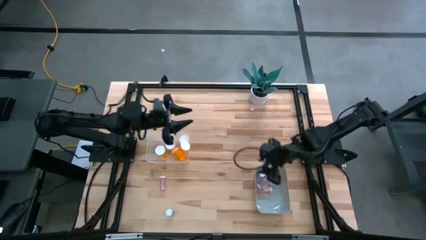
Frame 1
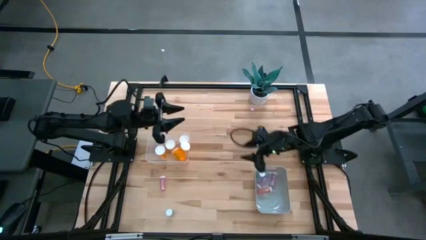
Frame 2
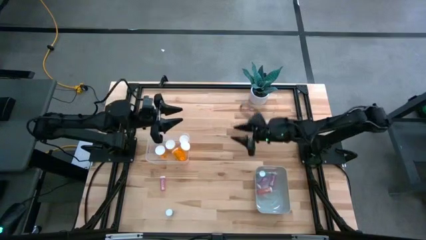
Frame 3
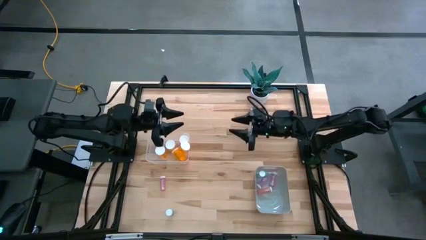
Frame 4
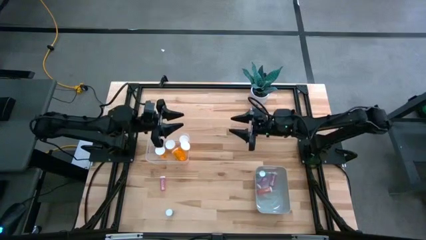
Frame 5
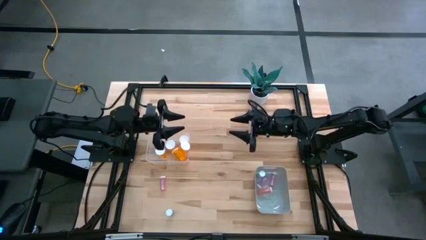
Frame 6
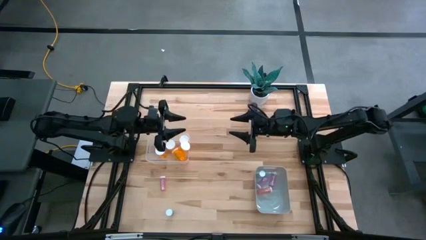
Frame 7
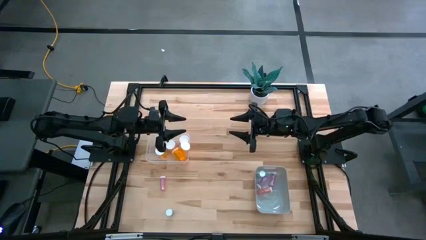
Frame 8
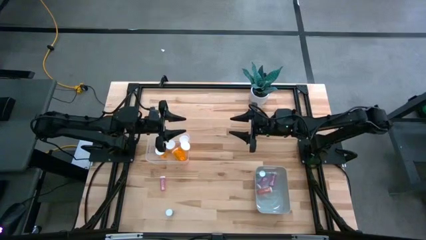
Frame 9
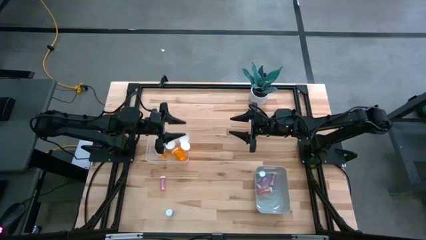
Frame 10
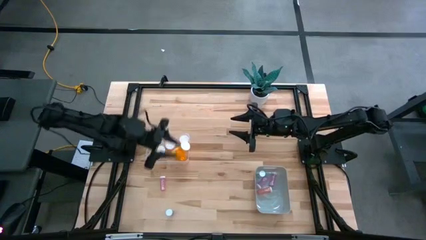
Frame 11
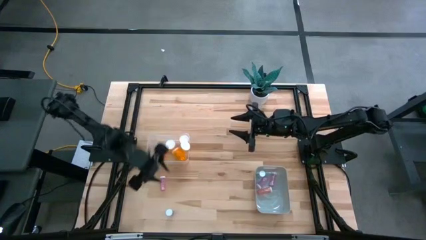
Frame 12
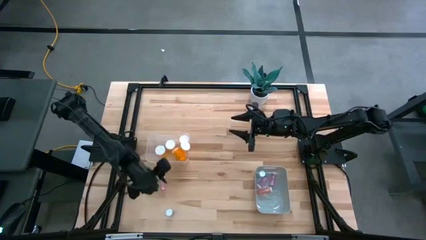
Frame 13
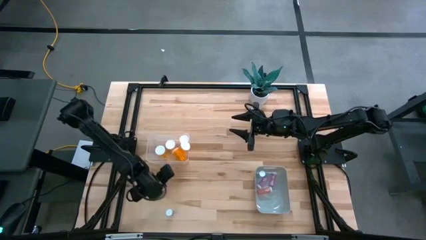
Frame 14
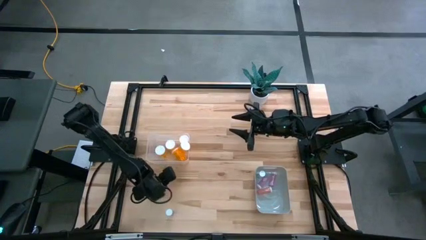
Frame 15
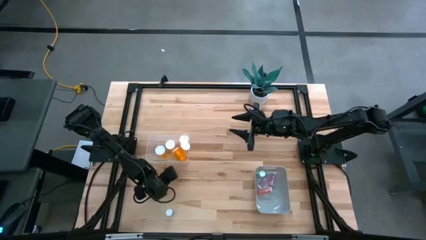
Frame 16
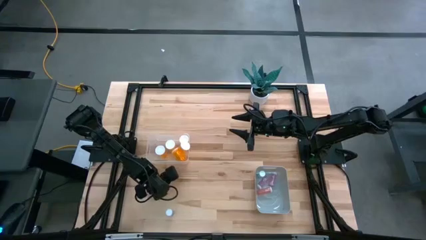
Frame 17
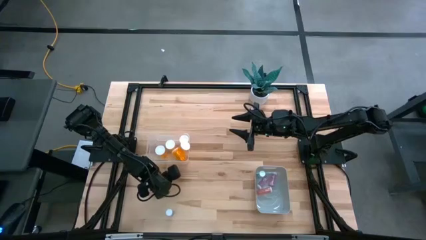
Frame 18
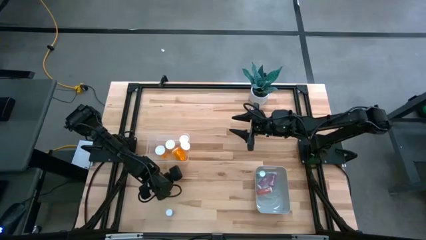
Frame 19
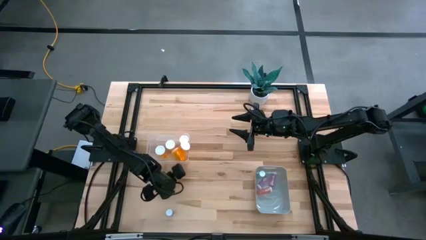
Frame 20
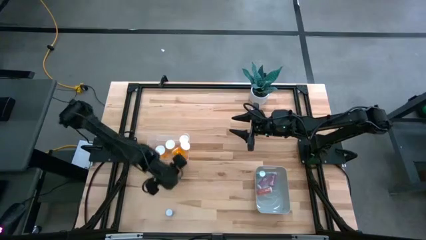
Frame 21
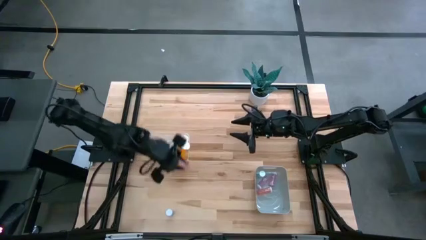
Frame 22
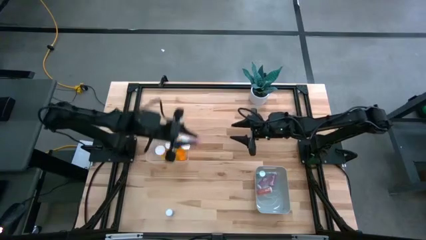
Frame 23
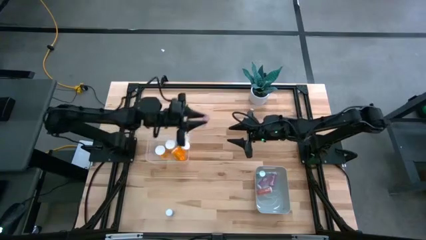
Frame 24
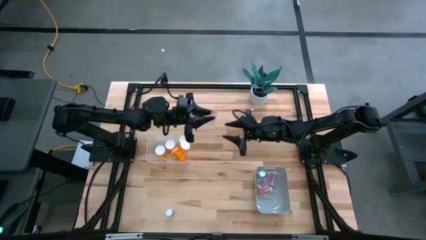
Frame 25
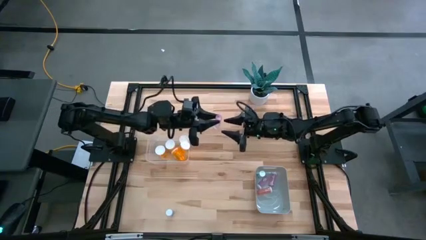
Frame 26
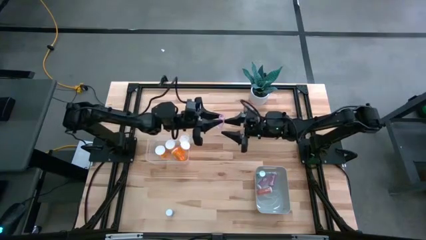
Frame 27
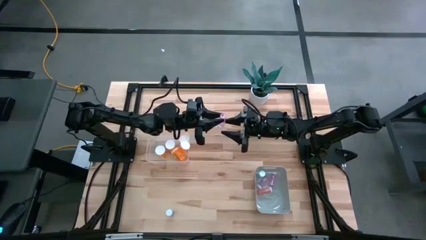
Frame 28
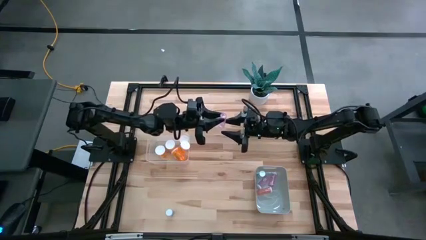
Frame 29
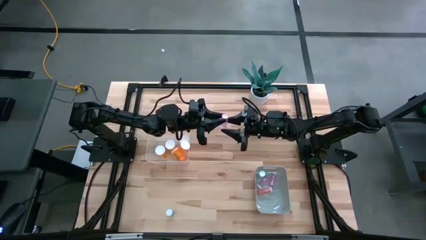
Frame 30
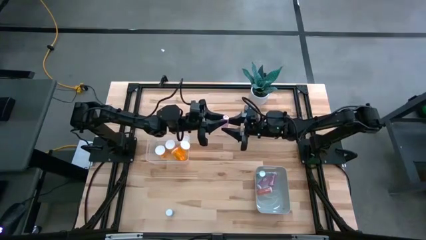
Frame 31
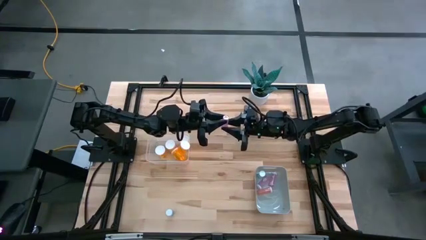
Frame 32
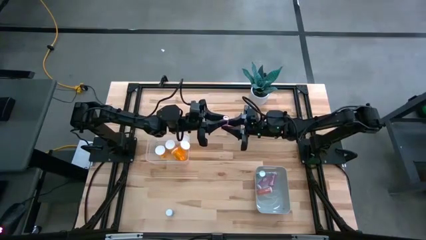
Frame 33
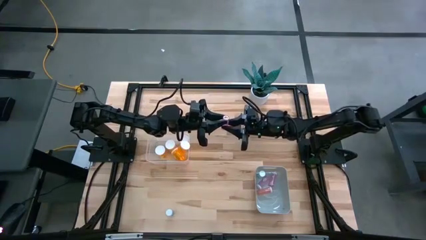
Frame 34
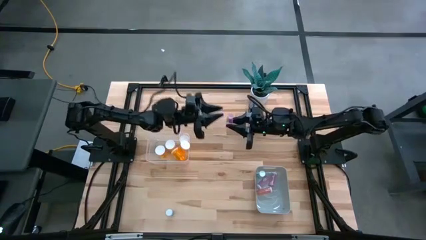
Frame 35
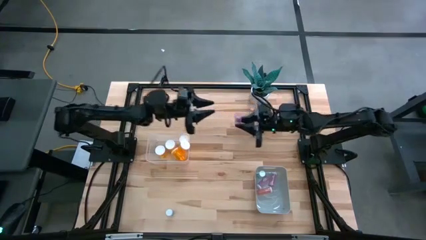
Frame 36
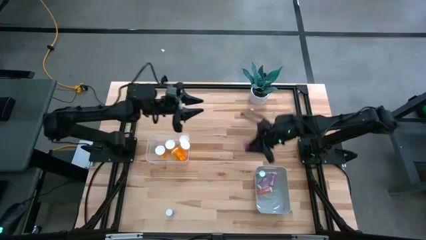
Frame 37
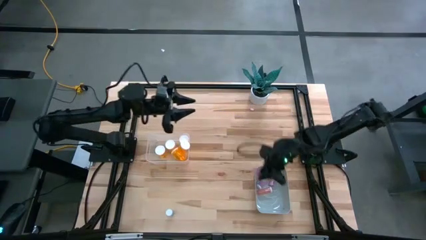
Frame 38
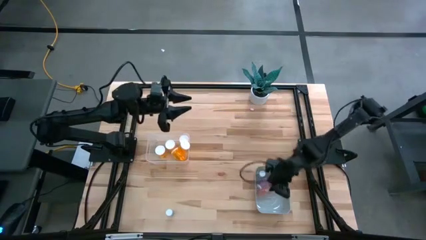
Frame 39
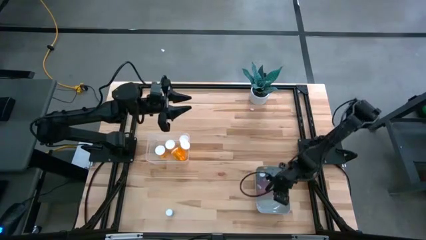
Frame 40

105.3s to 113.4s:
Task: Pick and place medicine bottles into bin by pill shape (circle, oval)
Put the small pink pill bottle into the gray bin

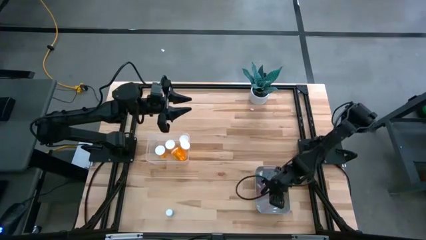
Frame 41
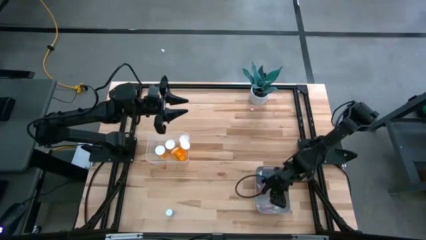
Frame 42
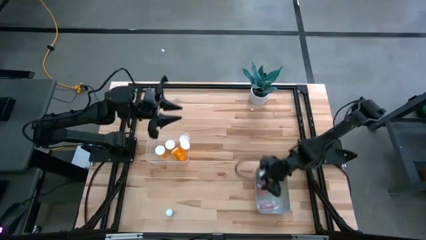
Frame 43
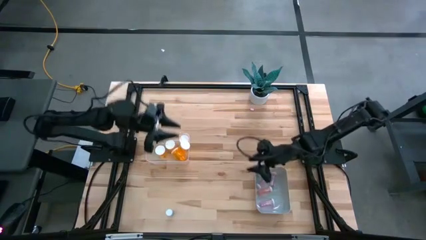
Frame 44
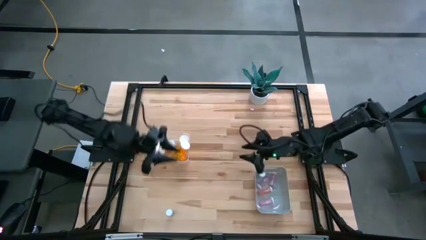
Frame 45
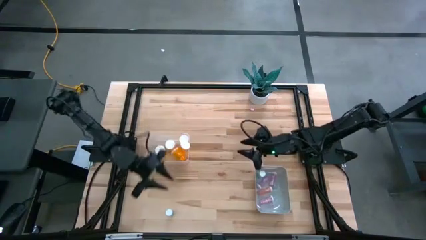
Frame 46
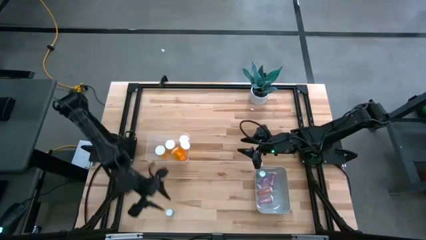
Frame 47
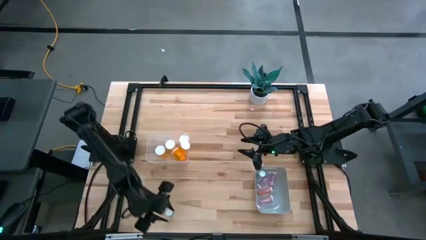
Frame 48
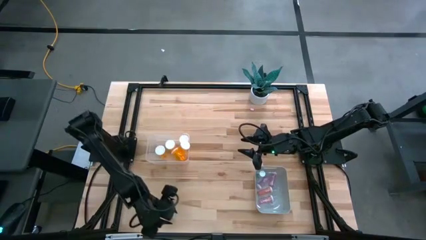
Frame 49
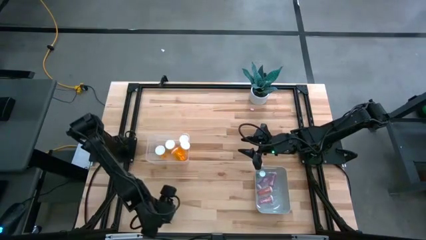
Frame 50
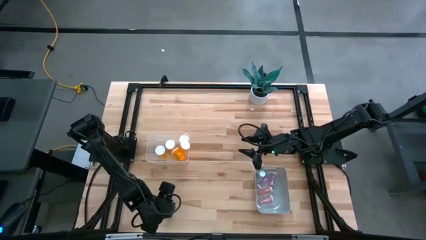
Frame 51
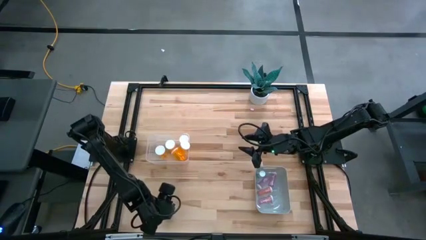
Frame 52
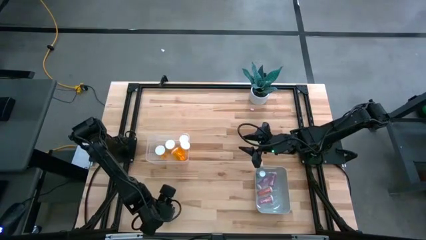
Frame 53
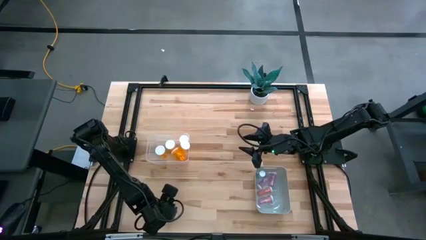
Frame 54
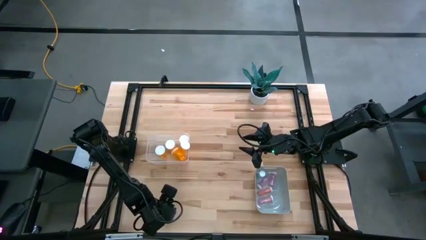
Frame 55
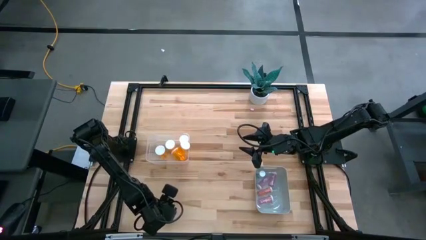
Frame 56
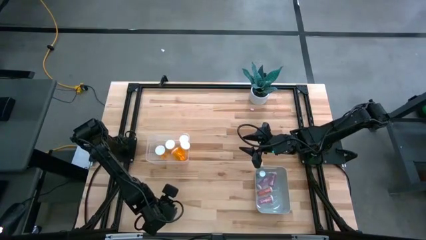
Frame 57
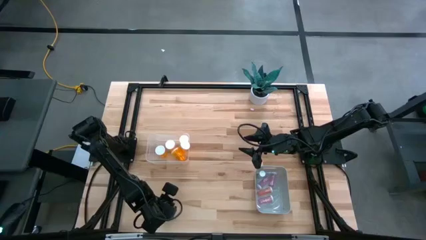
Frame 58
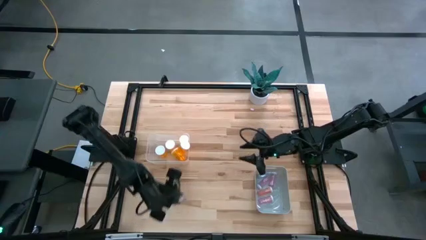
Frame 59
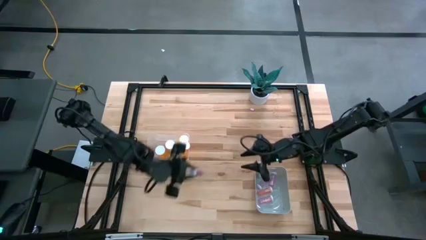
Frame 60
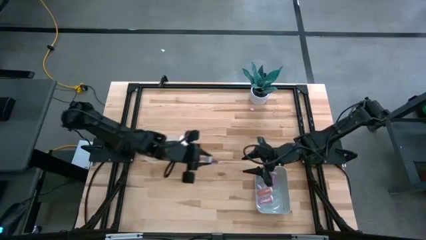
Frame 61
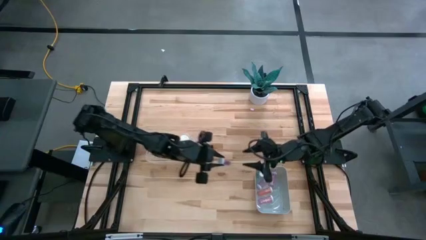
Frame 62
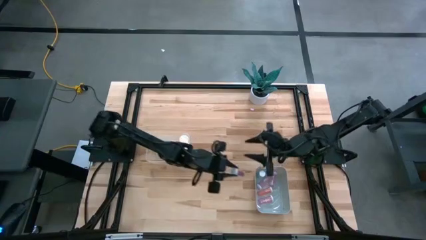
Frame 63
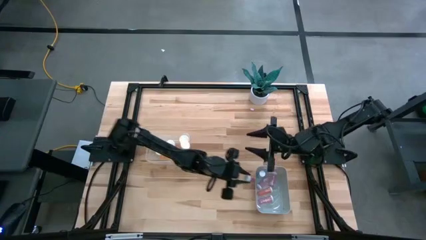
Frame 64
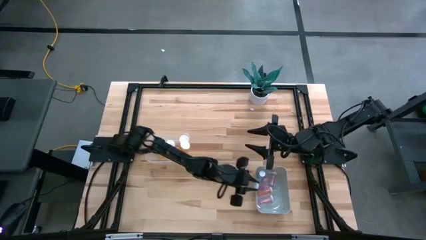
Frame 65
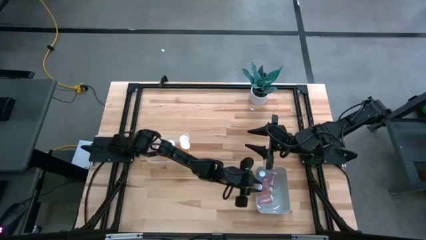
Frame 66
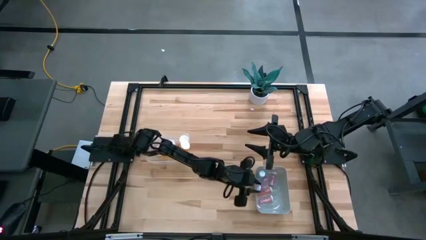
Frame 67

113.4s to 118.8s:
Put the small blue pill bottle into the gray bin

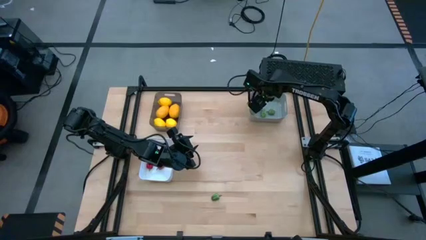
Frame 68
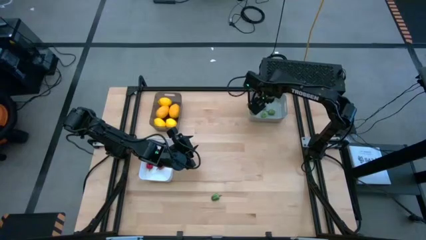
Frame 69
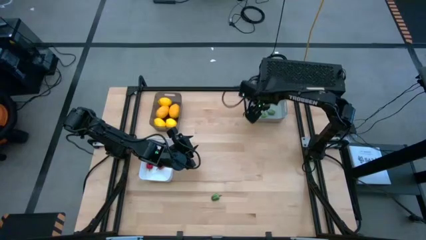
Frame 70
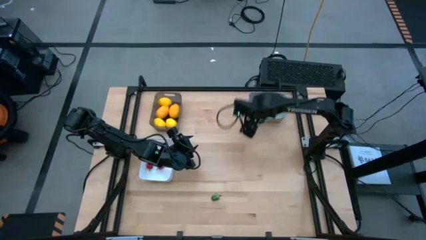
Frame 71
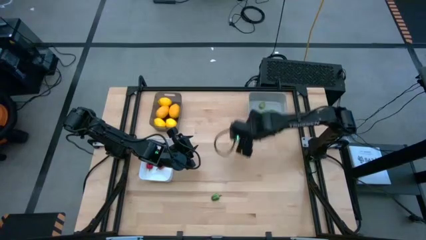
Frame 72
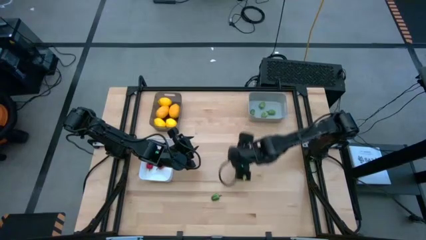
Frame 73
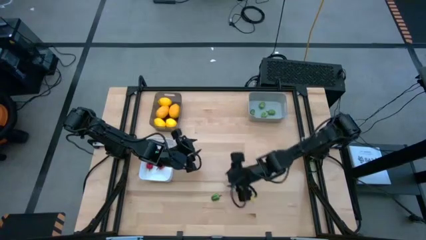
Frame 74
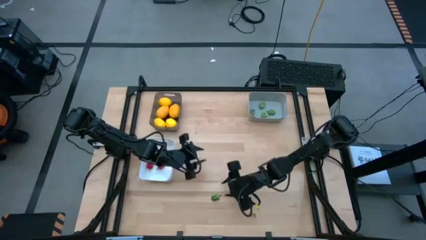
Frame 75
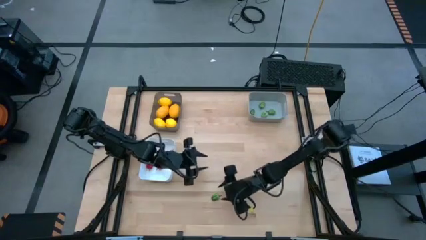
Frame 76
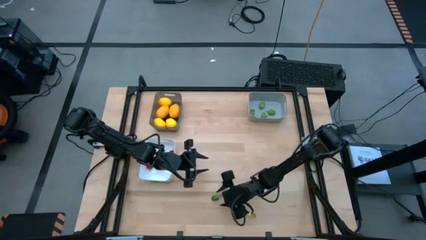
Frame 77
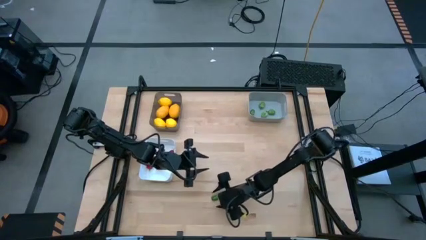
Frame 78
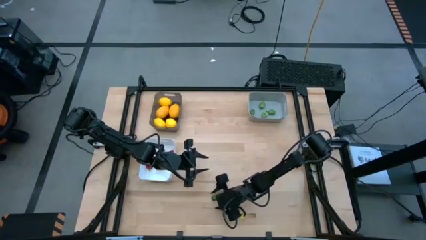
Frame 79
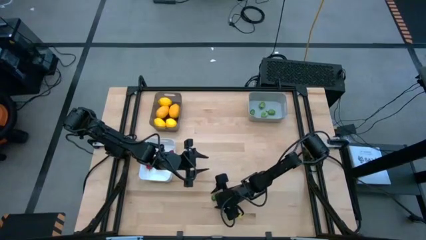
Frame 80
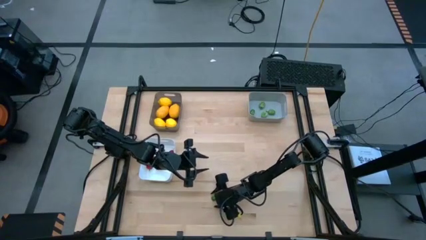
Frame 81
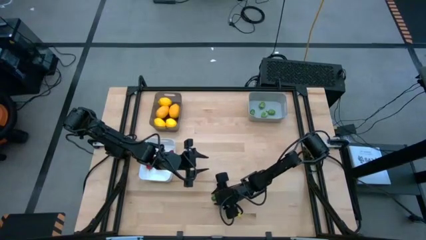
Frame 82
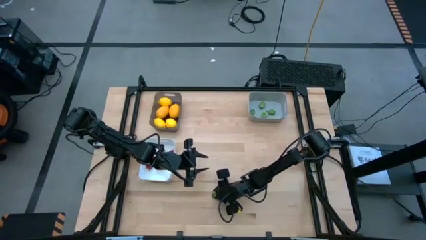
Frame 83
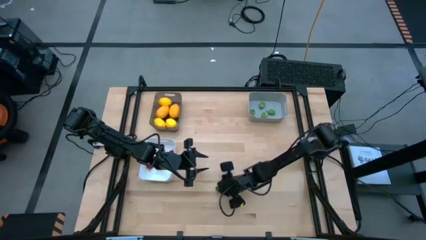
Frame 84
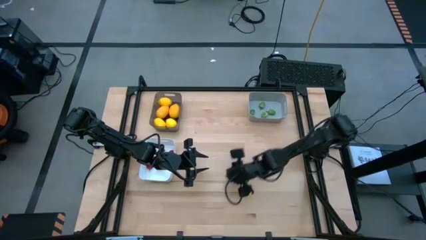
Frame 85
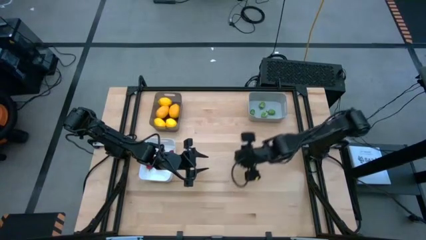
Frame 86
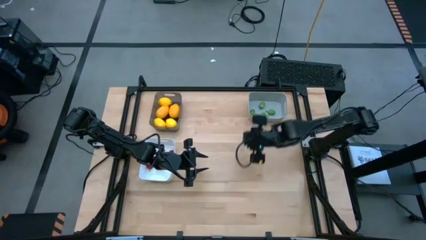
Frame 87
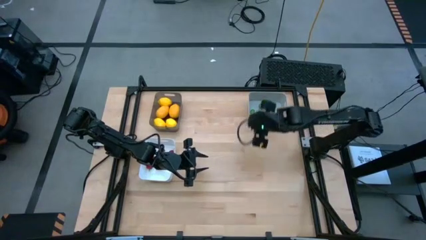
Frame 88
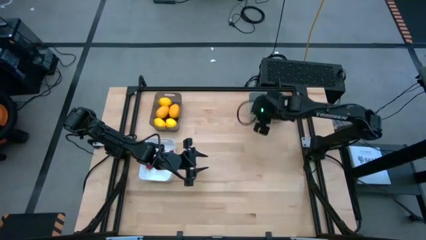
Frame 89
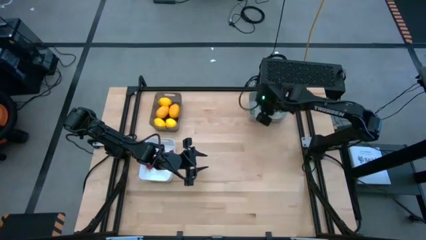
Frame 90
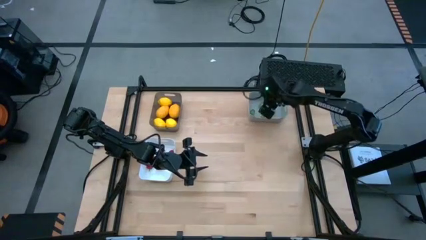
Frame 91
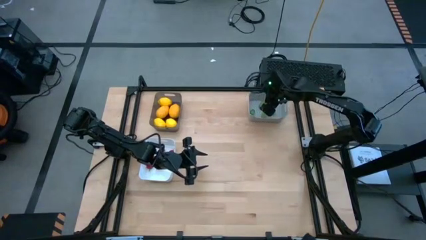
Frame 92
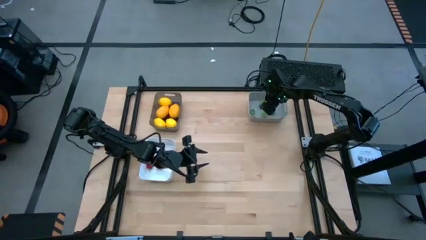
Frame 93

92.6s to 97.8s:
Task: Sort produce into baskets
Put the green chili pepper into the gray bin
